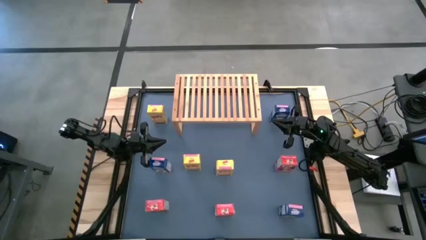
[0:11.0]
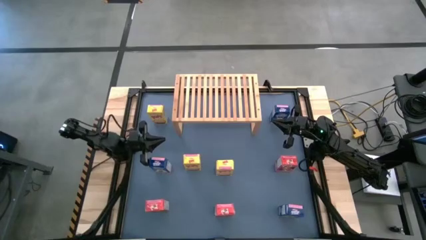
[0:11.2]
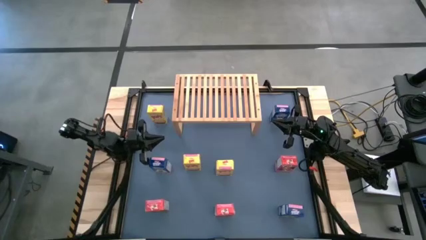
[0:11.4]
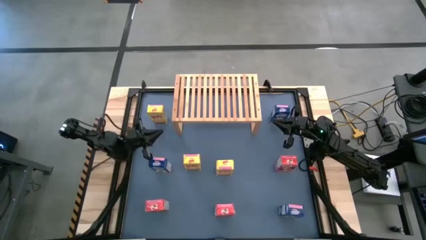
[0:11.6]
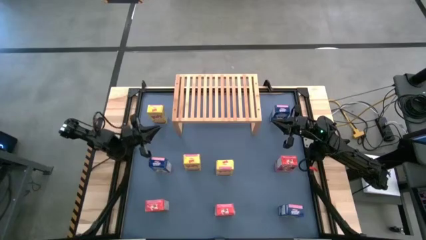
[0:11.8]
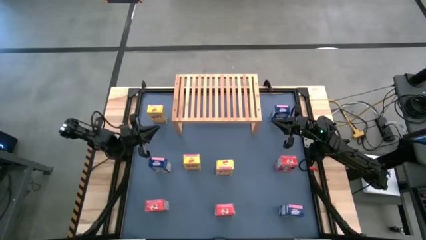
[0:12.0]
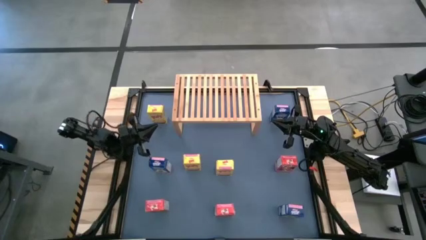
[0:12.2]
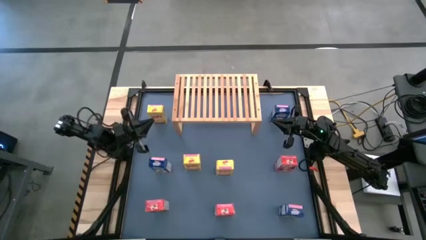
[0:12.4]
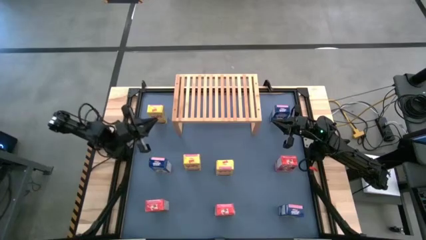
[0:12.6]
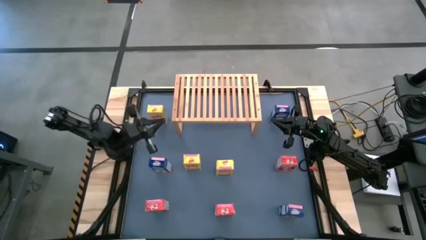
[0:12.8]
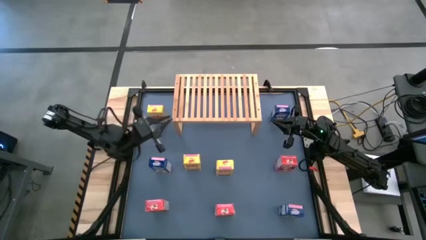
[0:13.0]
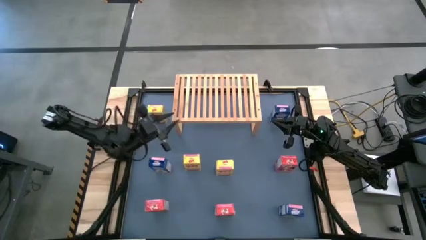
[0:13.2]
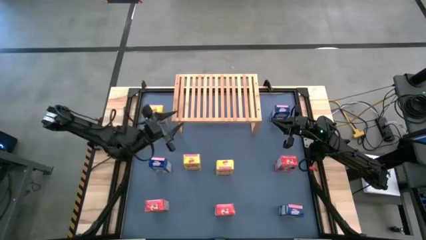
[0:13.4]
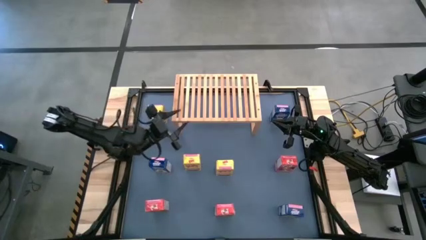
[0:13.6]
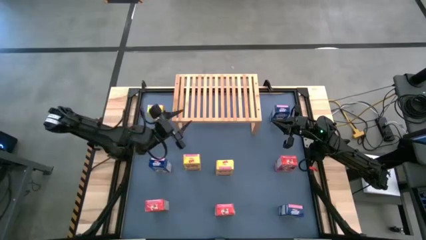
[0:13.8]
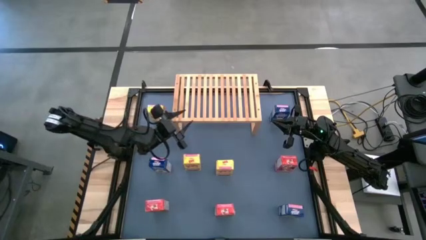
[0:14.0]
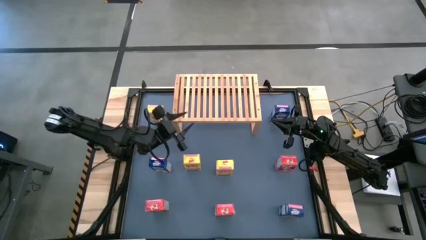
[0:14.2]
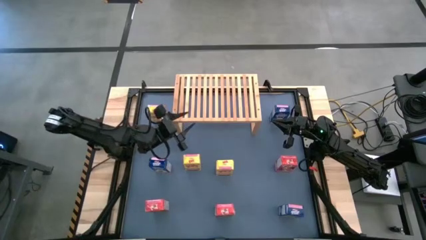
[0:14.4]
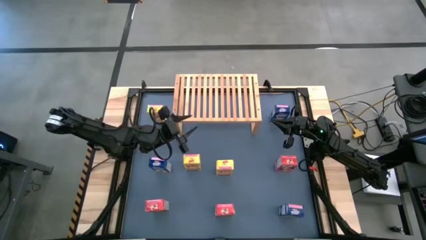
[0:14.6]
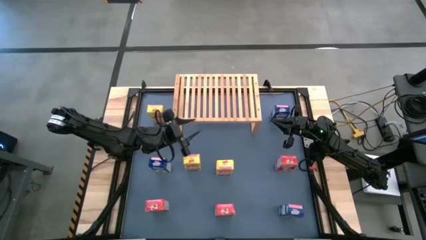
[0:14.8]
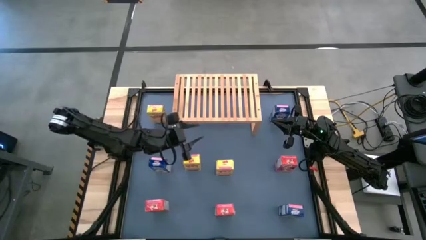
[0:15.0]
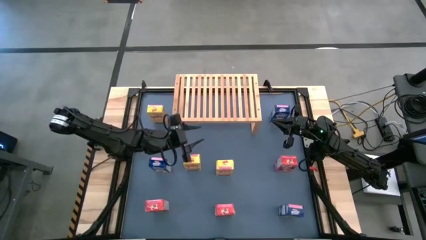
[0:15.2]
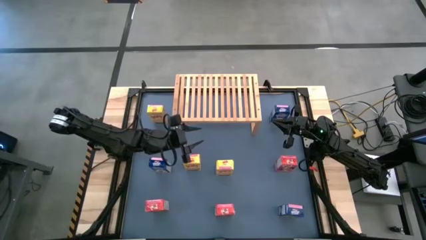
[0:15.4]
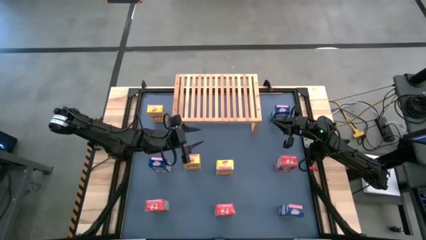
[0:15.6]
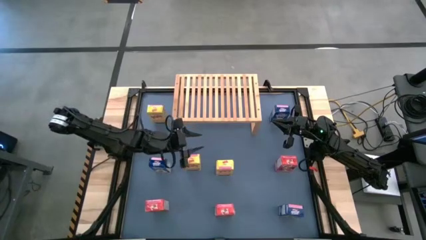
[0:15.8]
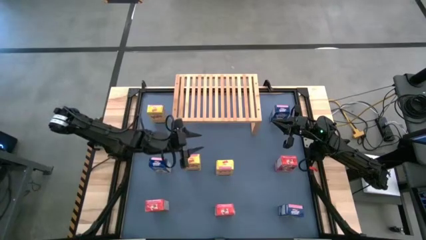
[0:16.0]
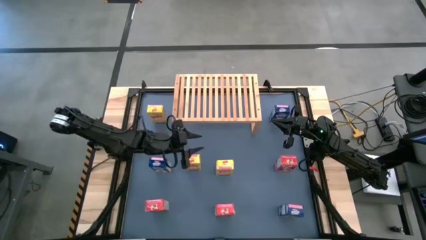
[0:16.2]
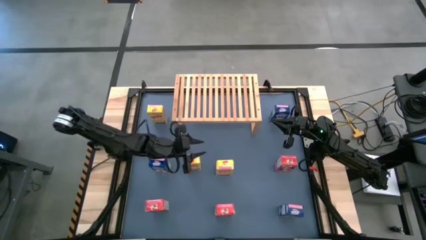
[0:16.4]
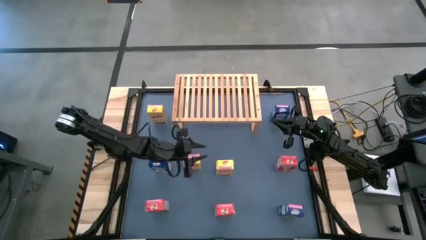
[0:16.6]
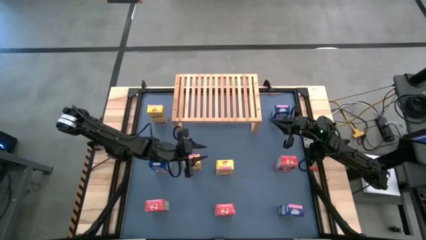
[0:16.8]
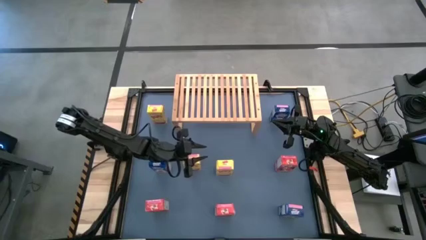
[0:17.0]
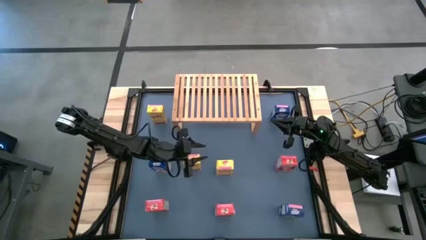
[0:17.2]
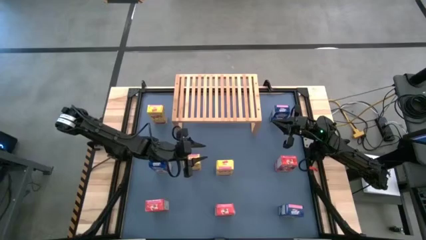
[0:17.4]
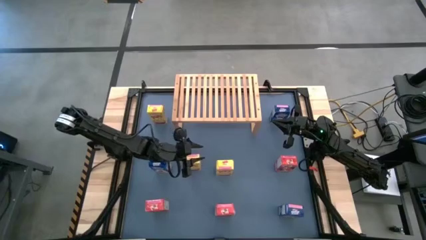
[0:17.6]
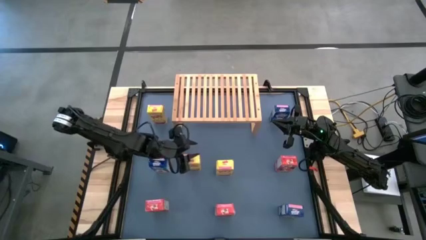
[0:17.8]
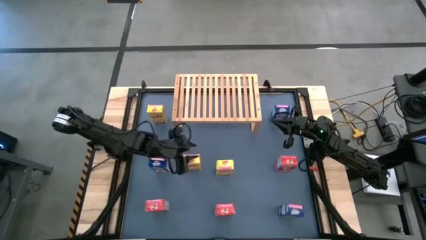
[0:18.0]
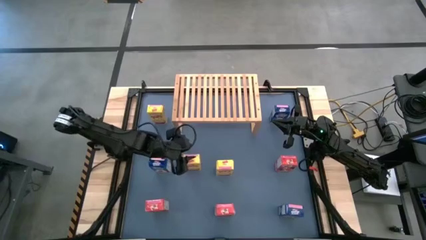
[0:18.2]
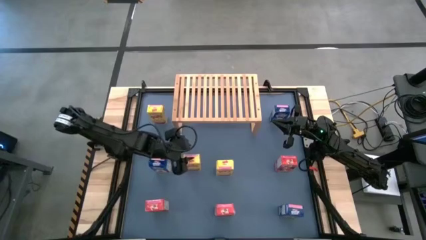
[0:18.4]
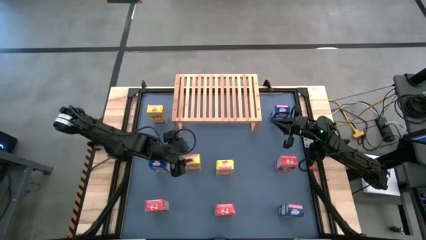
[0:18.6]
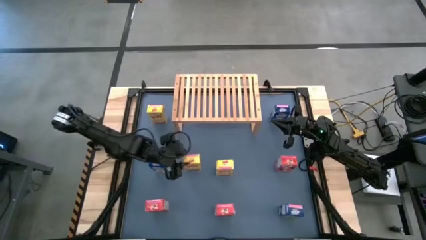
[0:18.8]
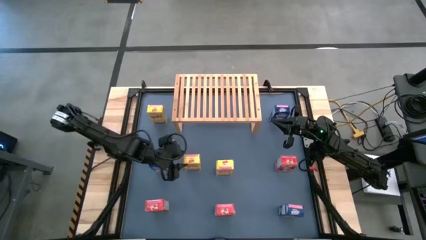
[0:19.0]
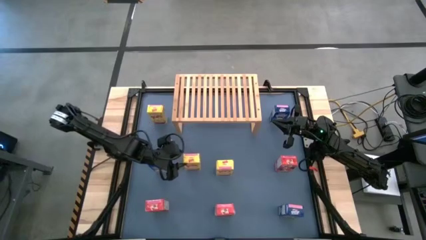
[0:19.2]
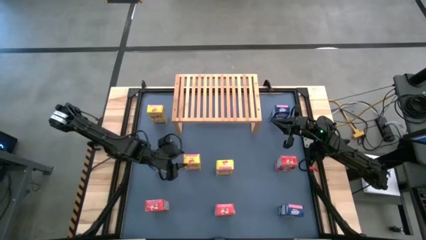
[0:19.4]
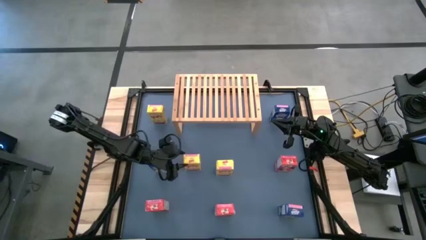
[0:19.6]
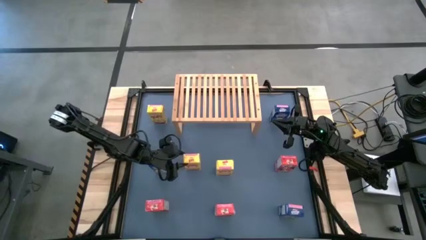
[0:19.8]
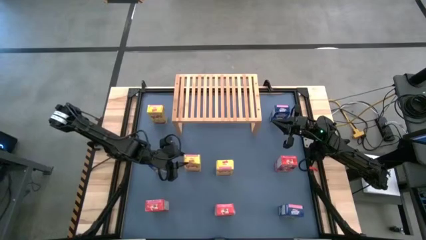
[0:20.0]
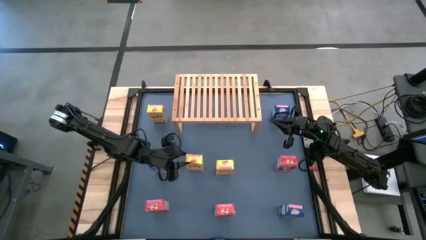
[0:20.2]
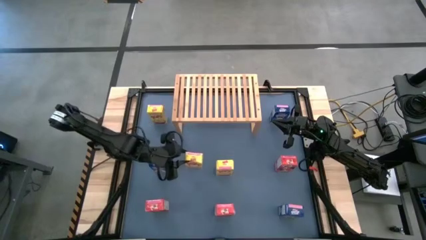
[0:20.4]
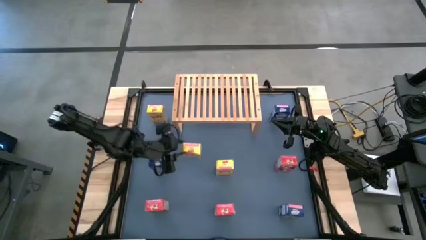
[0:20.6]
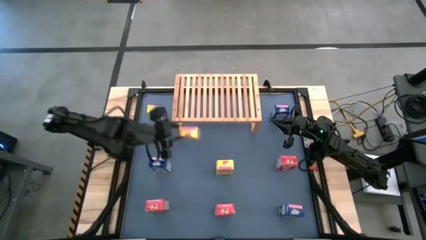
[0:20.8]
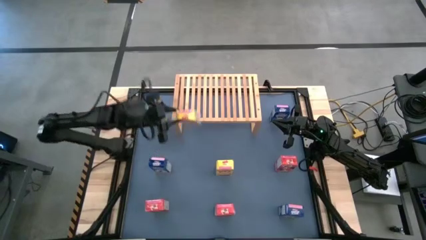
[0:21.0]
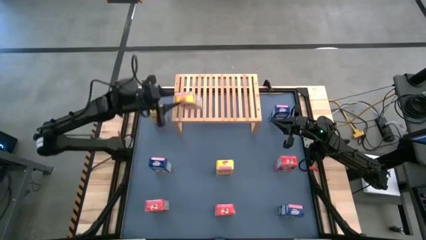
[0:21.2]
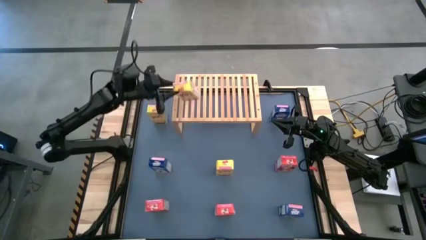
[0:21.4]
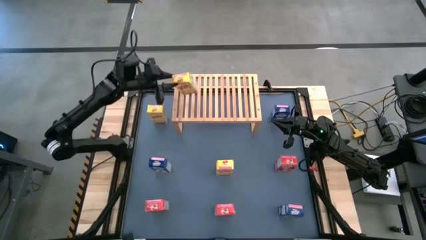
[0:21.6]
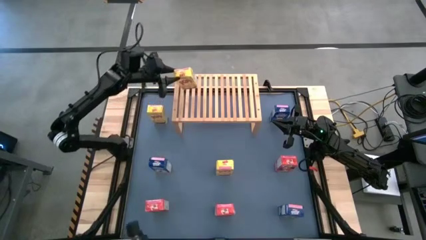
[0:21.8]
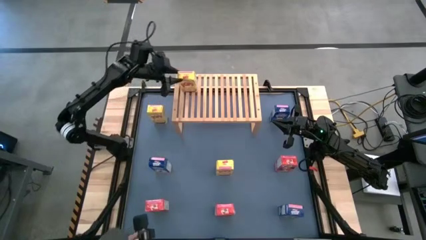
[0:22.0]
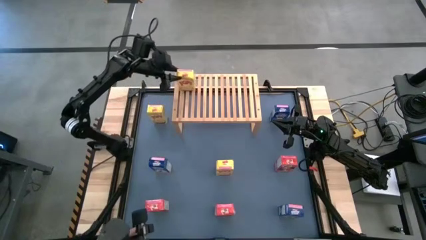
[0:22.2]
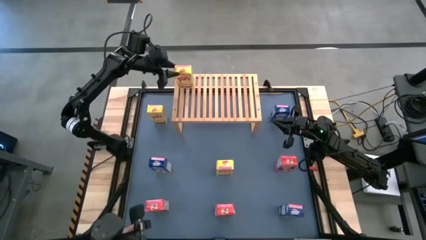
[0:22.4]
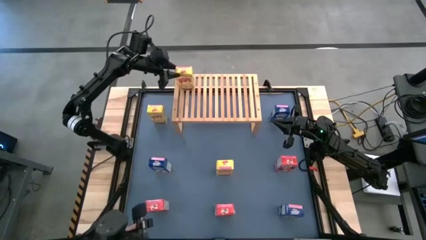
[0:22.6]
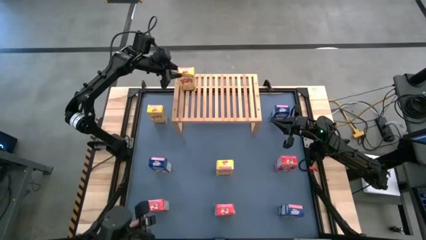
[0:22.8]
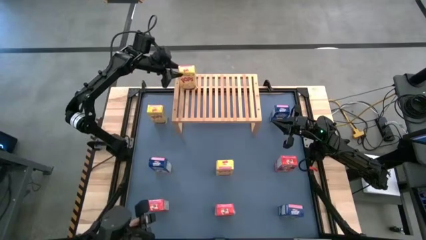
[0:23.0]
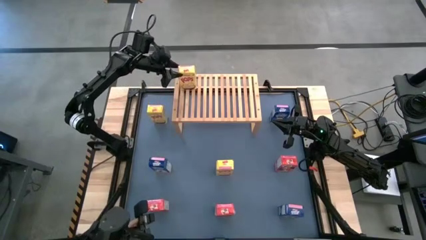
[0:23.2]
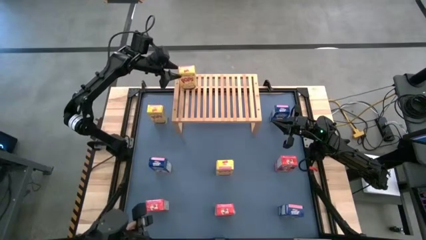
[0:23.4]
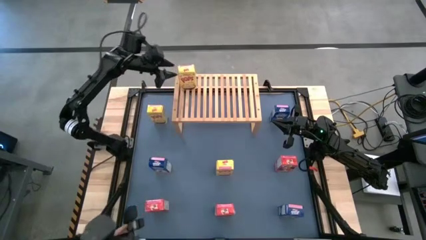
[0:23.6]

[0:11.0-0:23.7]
Task: Stack cereal on shelf
Put the bottom left yellow cereal box on the shelf

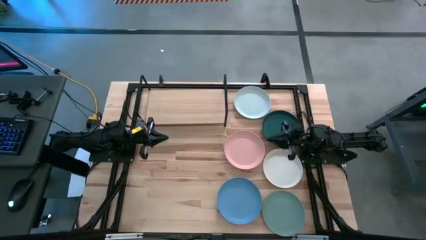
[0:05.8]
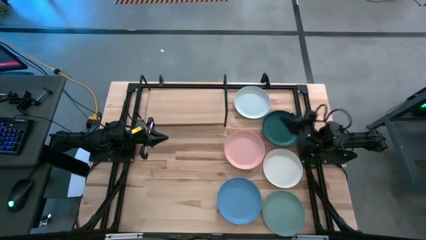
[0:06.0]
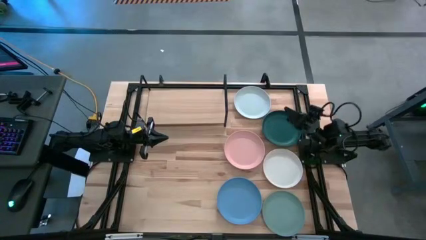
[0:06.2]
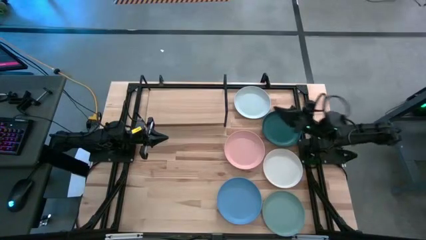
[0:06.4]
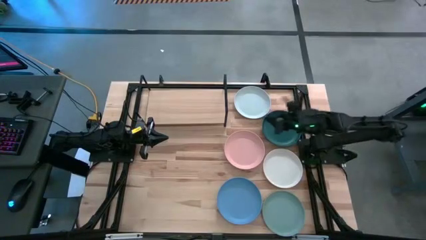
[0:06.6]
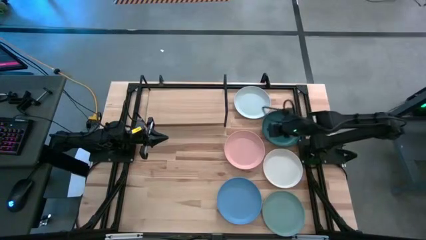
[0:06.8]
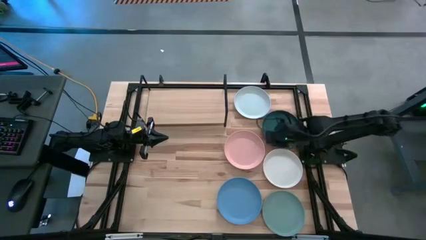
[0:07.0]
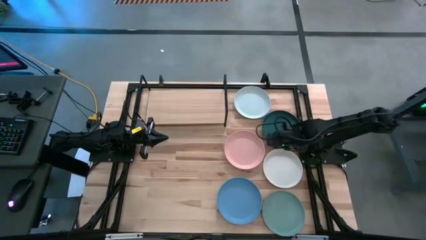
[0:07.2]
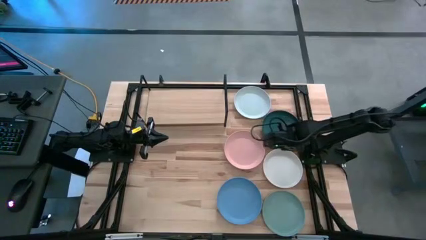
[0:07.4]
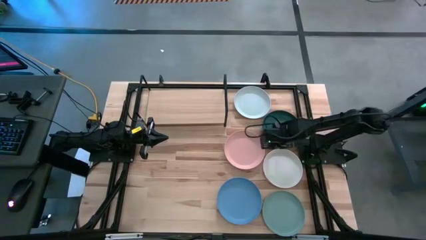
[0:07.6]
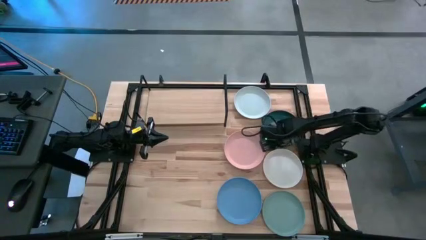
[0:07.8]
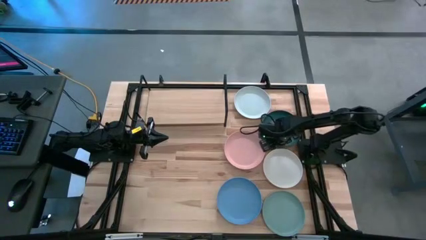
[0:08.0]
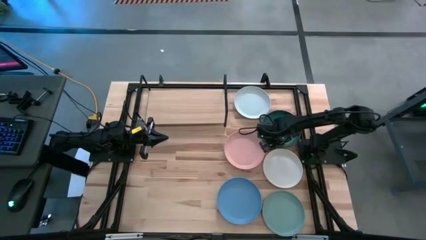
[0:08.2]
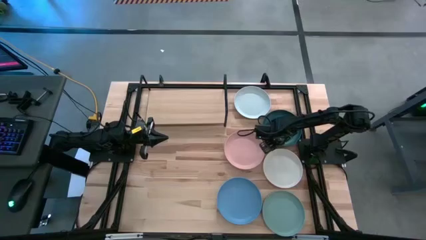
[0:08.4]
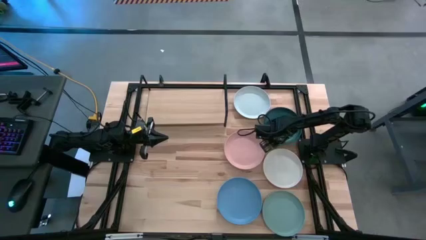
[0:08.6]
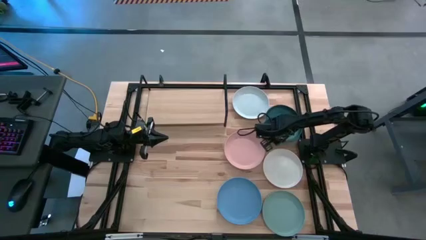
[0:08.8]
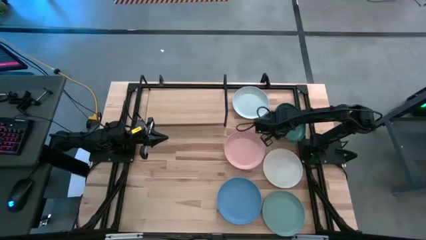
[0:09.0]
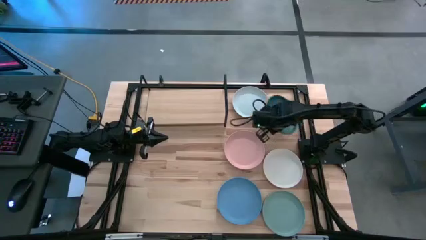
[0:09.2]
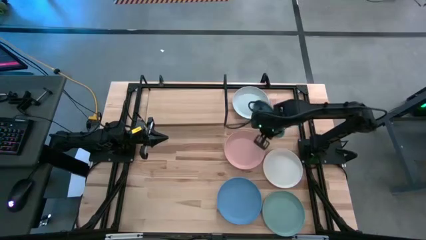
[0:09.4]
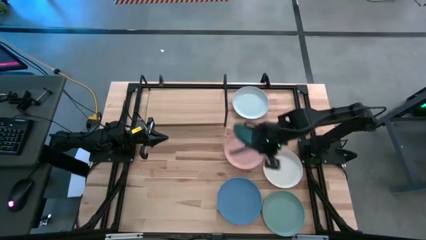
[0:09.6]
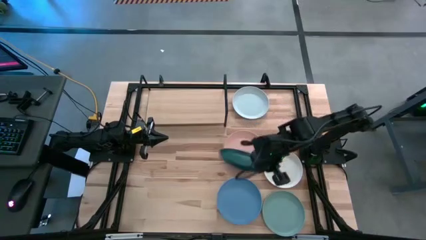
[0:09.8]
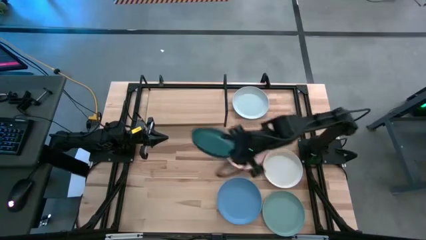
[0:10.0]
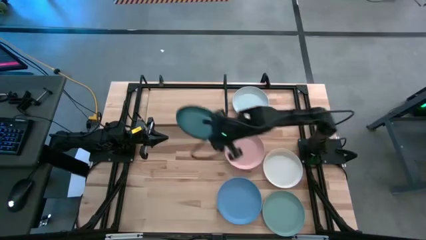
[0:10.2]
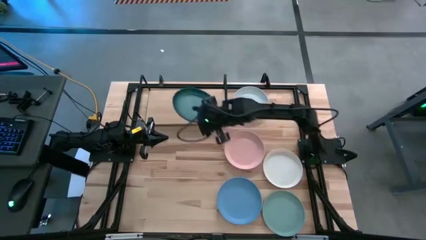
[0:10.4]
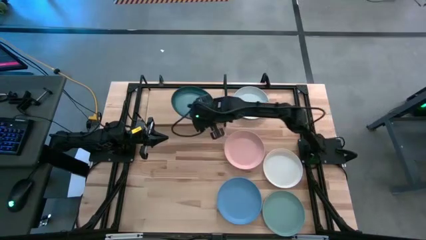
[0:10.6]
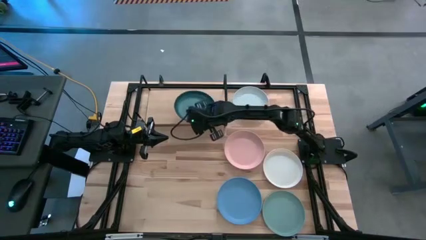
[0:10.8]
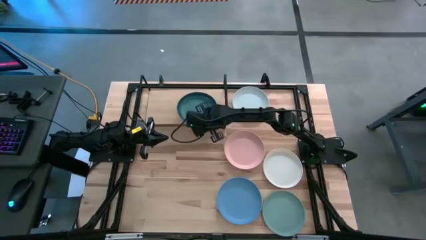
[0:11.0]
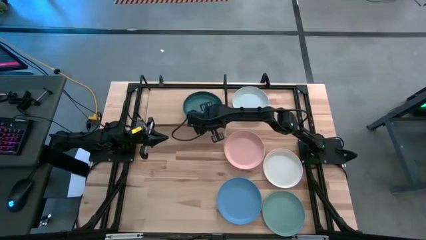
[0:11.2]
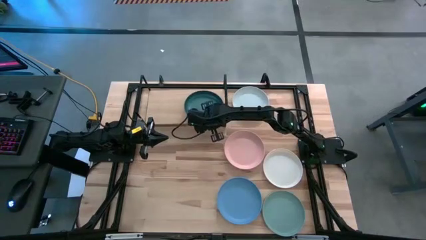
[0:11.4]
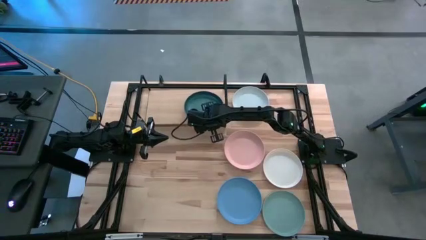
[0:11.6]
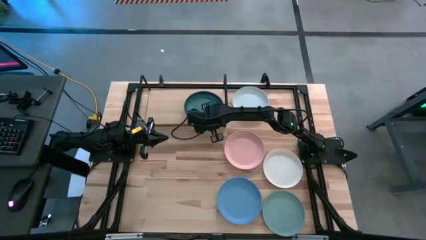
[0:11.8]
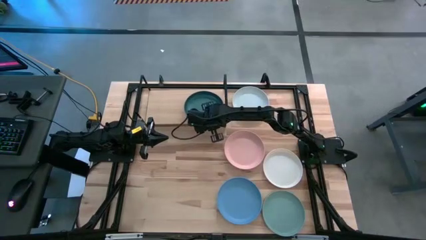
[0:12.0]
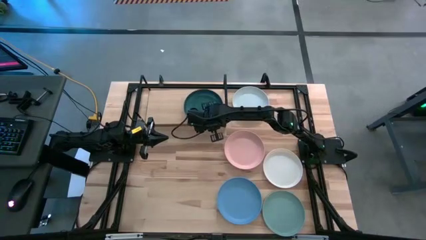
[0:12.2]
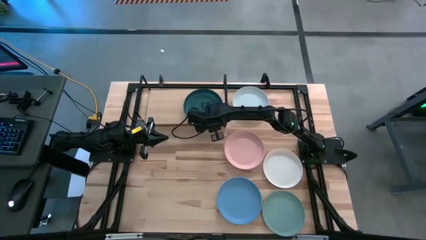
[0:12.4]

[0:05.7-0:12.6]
Task: Place and stack plates onto a shelf
Put the dark green plate into the shelf
